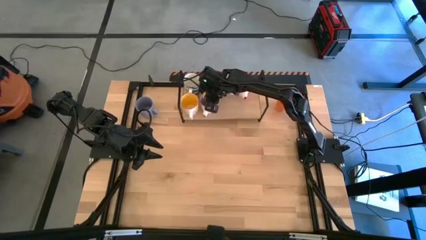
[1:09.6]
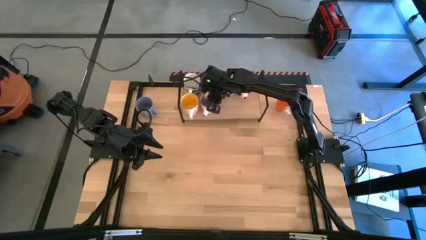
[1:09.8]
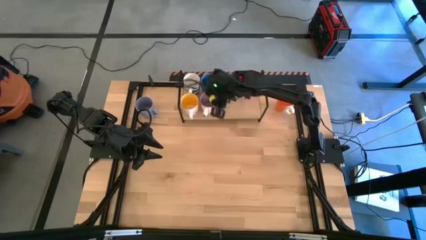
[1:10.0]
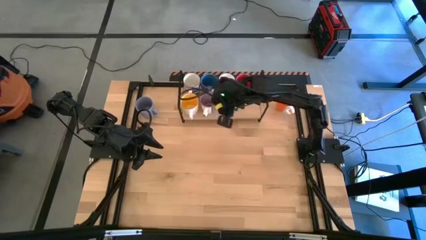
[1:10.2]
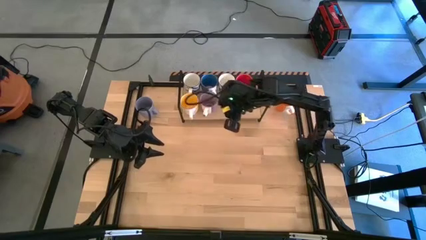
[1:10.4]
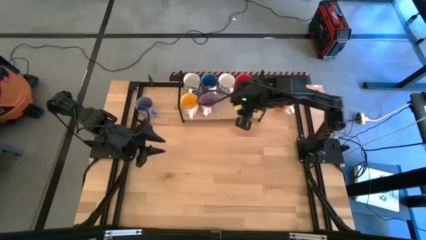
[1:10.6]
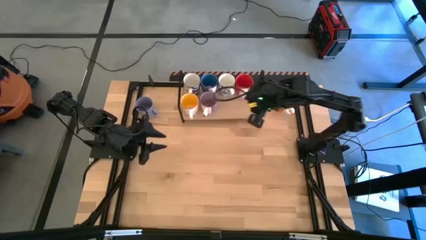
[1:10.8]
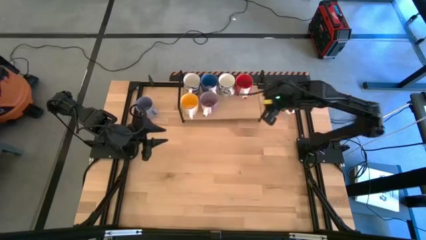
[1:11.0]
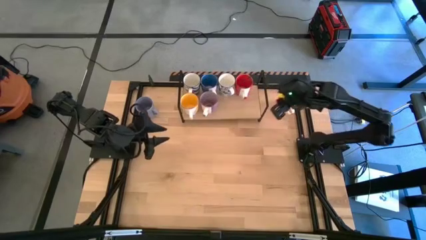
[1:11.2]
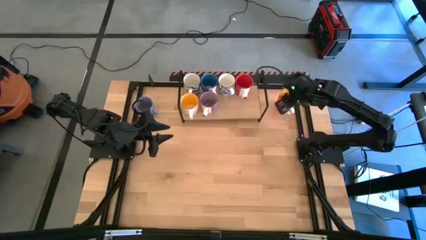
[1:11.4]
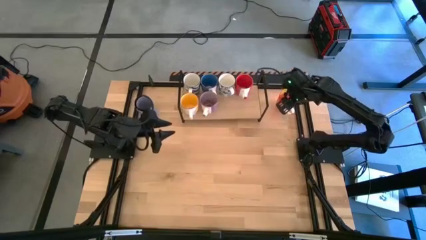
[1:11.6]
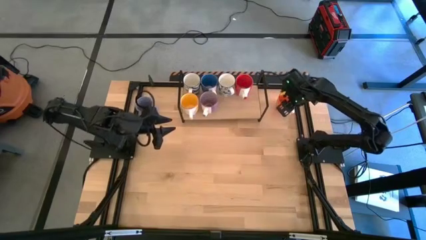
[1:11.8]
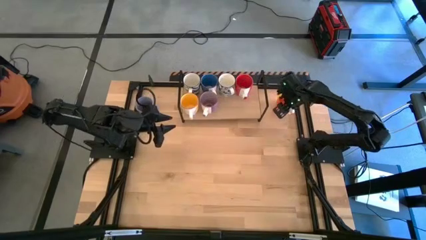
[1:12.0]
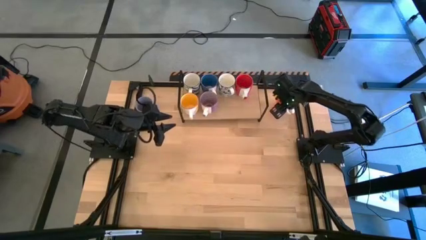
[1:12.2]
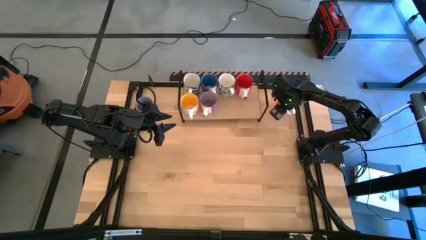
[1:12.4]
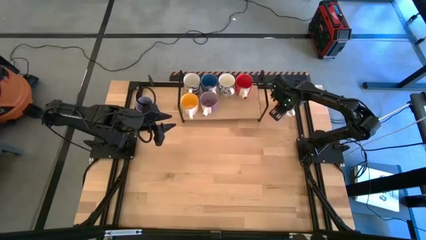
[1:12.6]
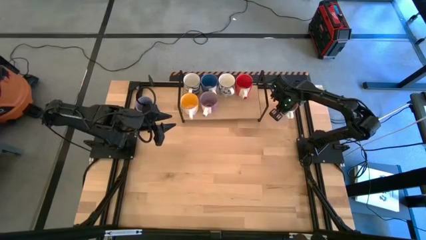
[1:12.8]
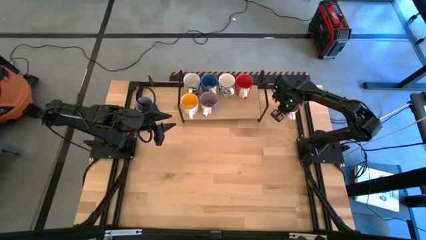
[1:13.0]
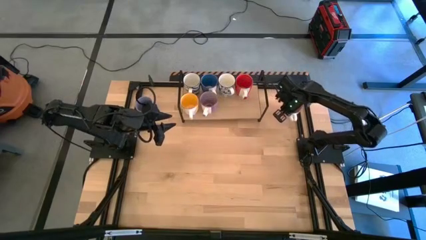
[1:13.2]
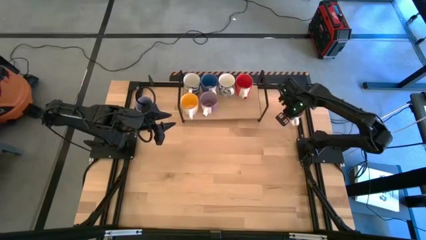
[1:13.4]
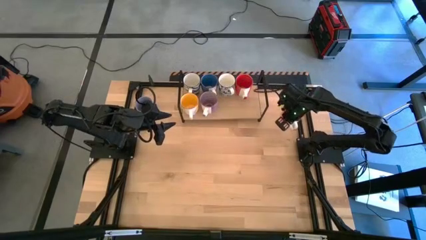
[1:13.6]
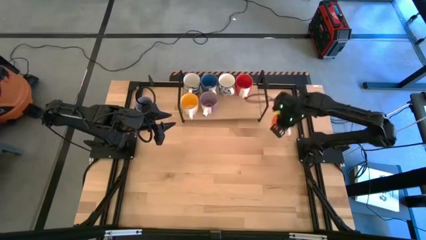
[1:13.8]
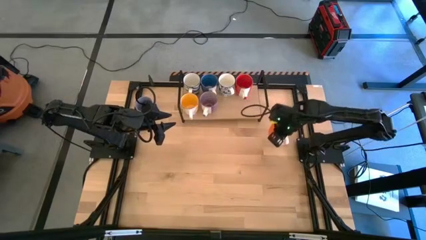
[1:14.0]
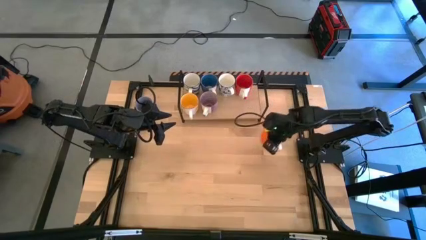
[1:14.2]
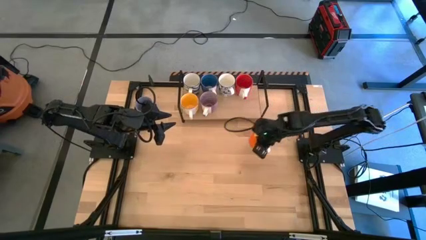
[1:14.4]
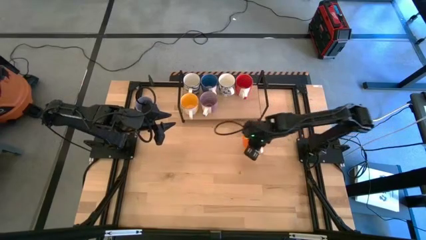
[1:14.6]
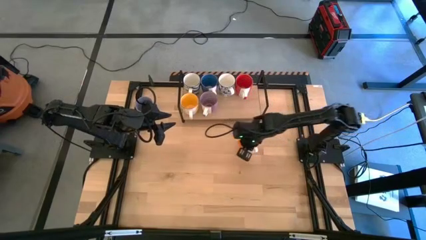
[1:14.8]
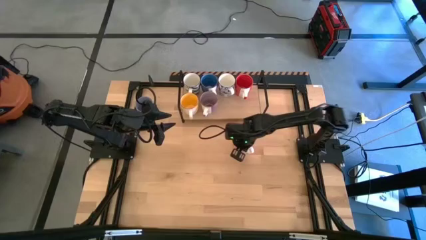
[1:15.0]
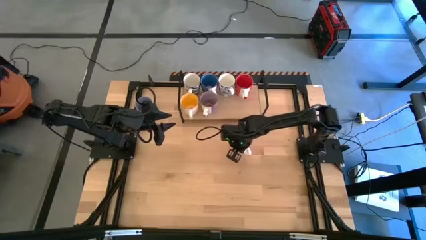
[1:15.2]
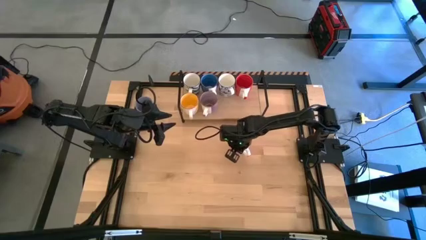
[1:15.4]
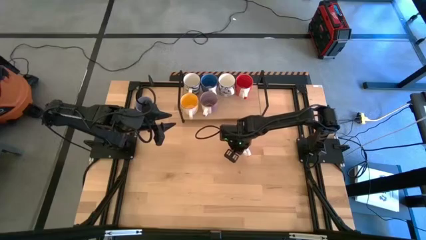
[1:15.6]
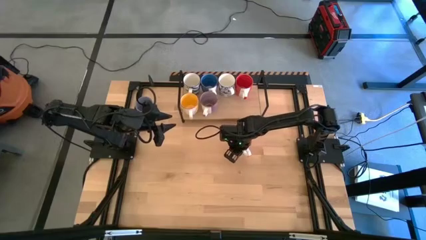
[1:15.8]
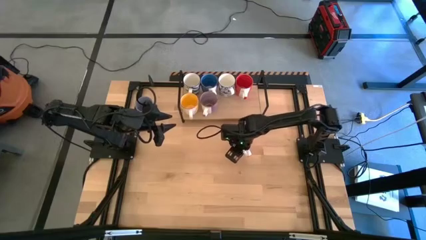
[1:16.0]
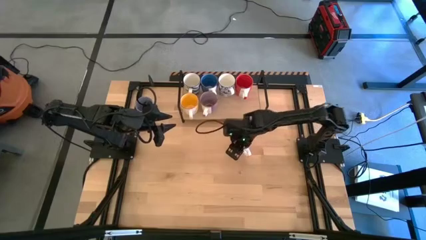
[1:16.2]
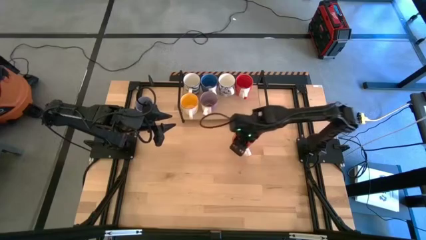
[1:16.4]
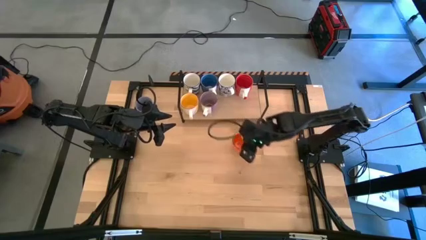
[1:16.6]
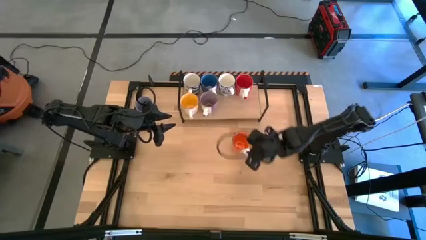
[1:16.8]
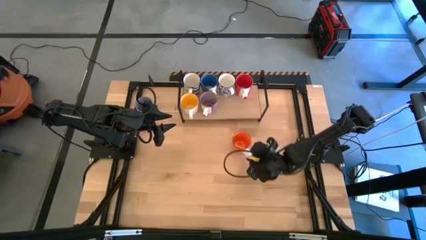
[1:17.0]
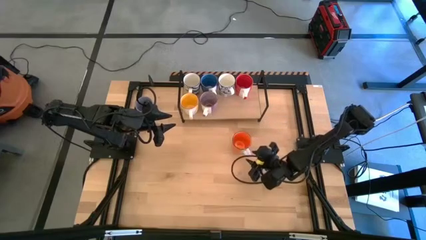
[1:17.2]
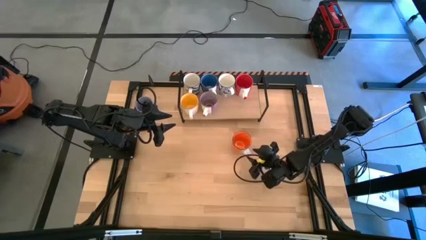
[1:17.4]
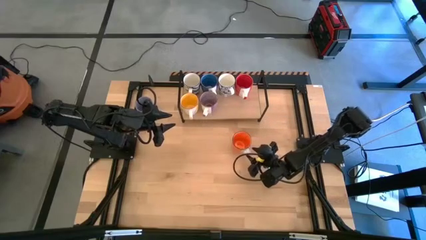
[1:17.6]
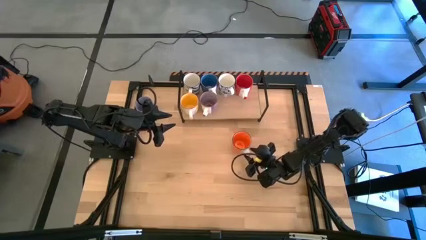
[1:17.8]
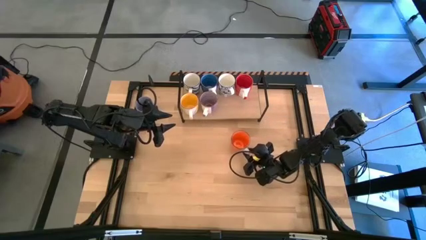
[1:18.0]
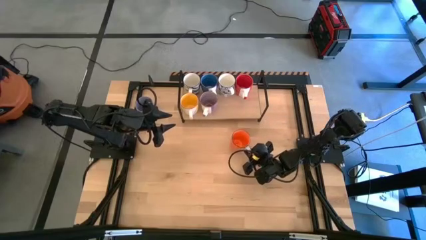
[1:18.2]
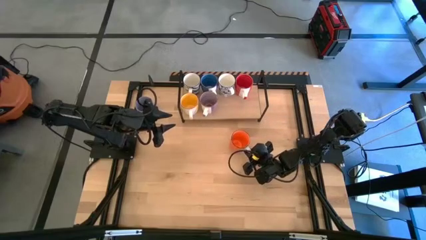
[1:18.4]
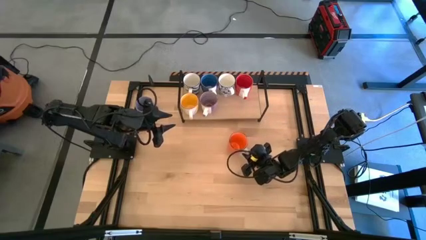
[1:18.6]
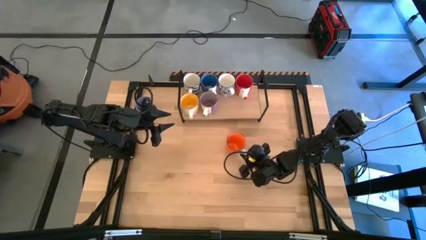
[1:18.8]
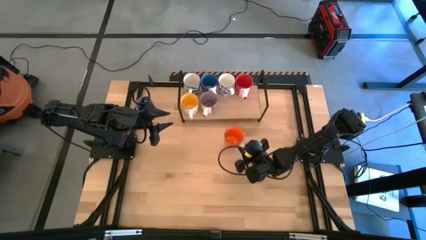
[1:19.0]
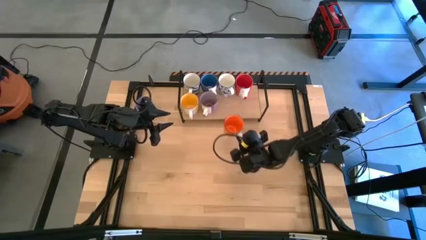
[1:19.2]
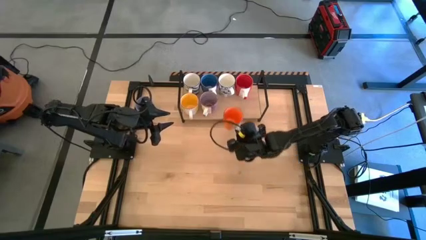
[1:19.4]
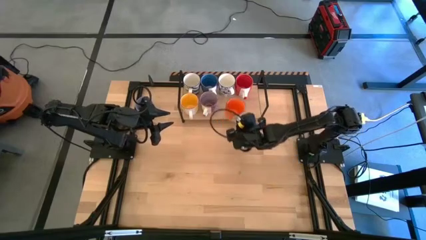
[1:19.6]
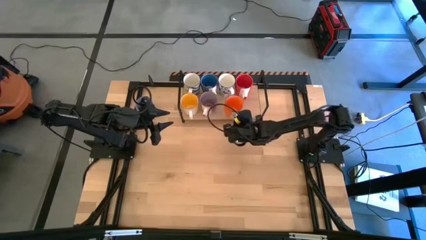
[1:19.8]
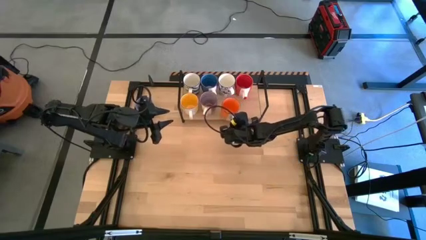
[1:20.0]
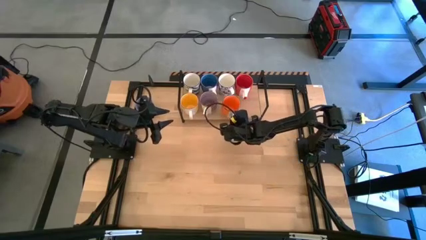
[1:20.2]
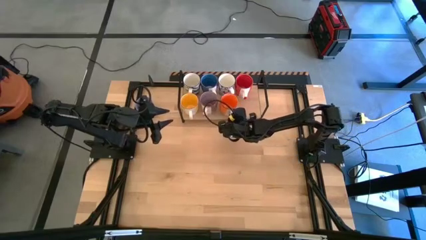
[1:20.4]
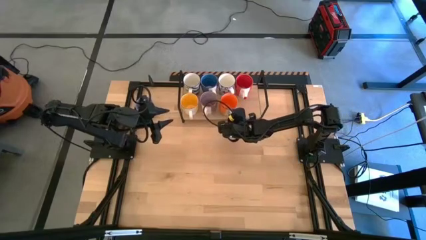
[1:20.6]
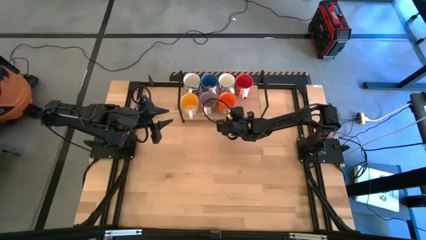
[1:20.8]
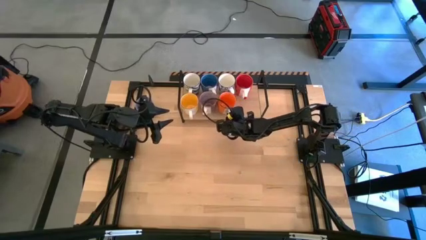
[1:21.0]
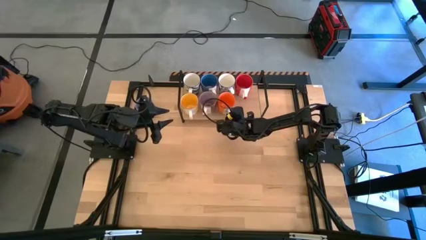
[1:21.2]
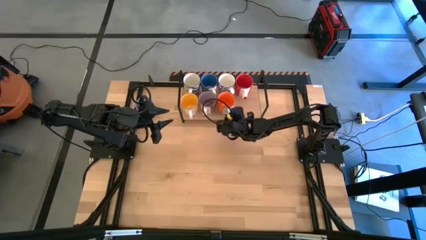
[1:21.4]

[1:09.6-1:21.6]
Task: Place coffee mugs
Put the orange mug on the shelf

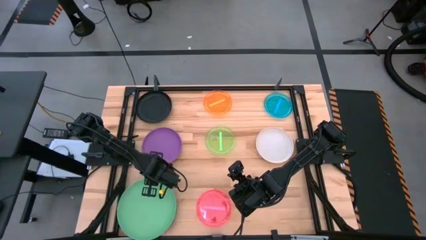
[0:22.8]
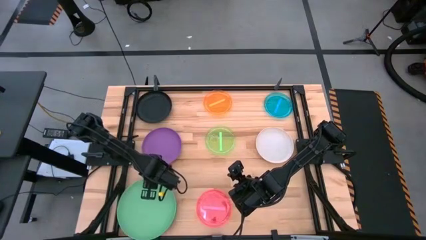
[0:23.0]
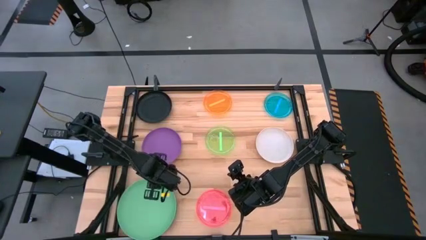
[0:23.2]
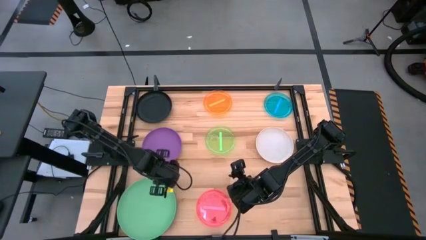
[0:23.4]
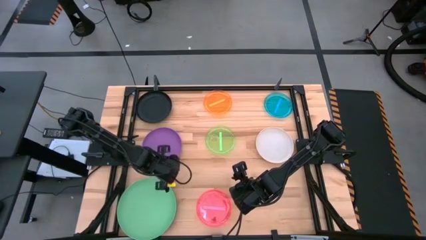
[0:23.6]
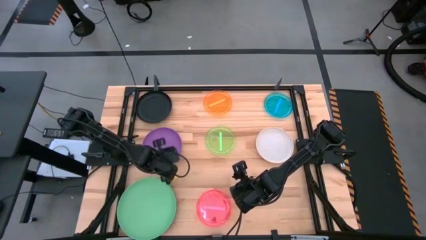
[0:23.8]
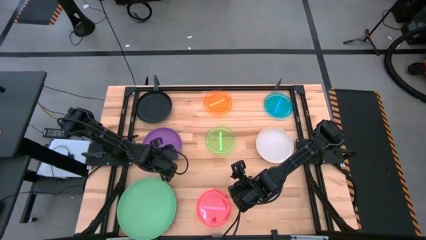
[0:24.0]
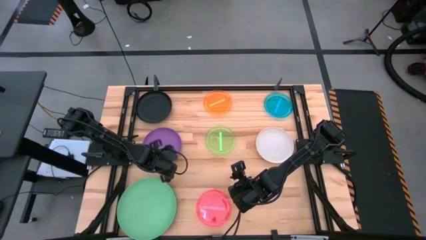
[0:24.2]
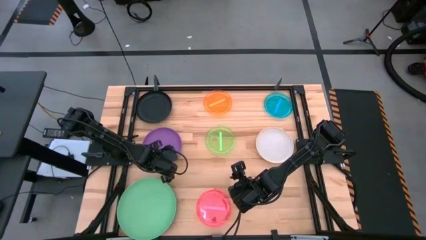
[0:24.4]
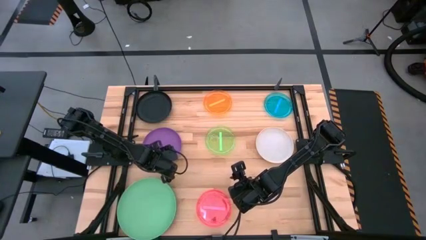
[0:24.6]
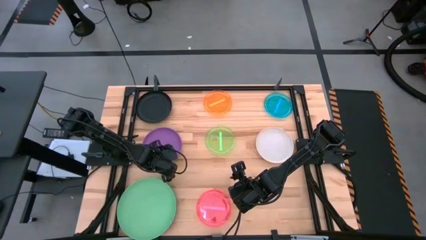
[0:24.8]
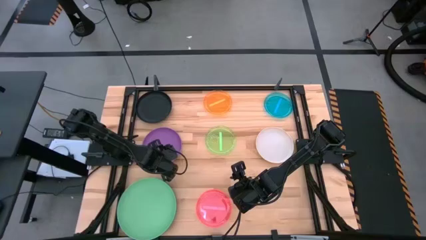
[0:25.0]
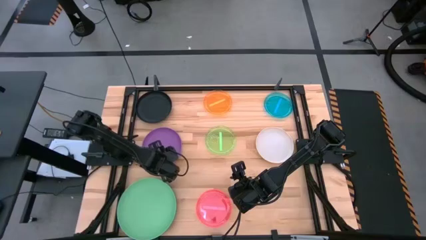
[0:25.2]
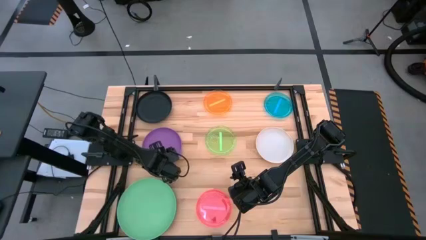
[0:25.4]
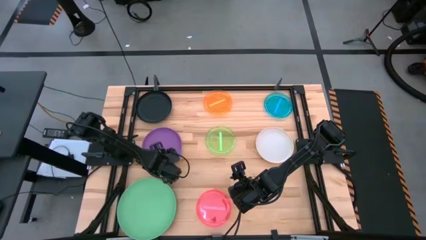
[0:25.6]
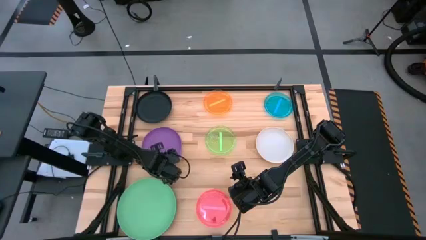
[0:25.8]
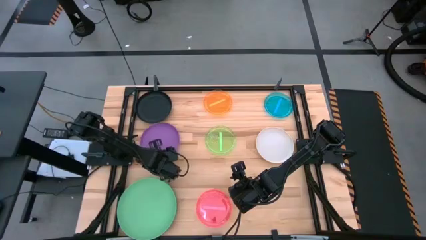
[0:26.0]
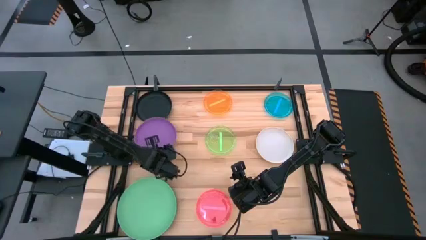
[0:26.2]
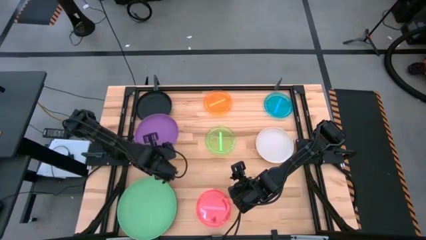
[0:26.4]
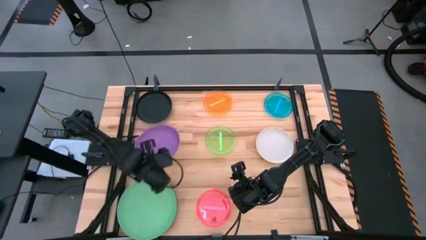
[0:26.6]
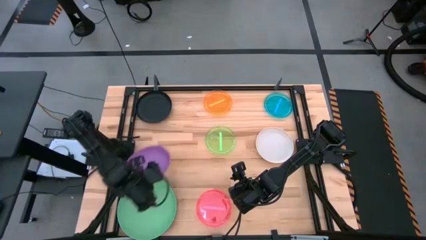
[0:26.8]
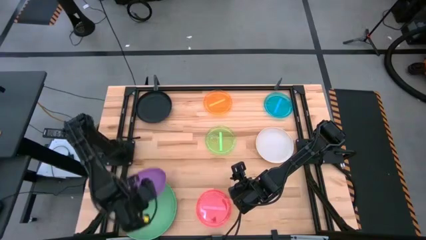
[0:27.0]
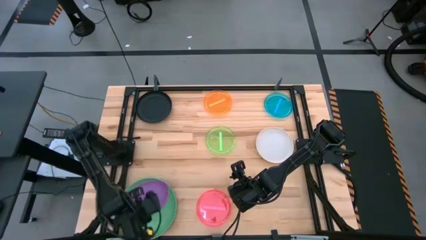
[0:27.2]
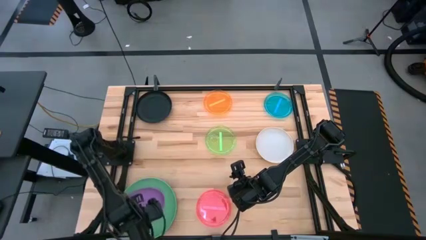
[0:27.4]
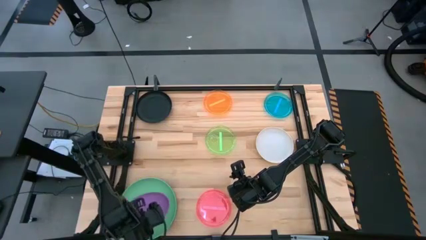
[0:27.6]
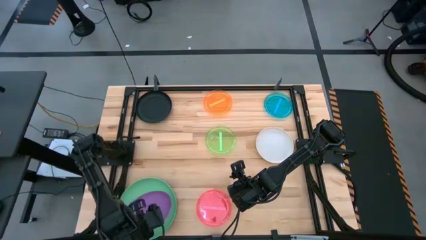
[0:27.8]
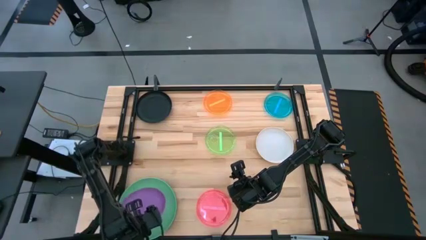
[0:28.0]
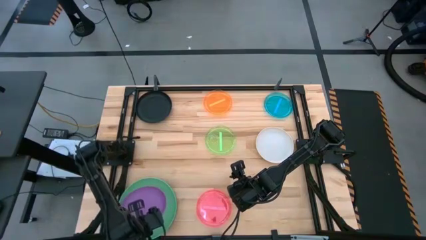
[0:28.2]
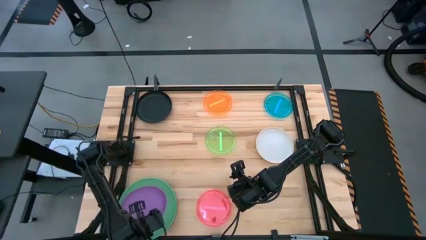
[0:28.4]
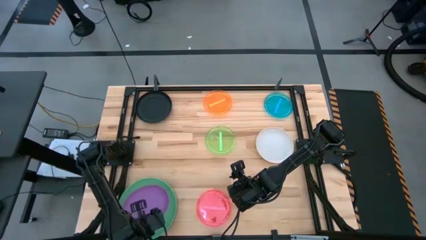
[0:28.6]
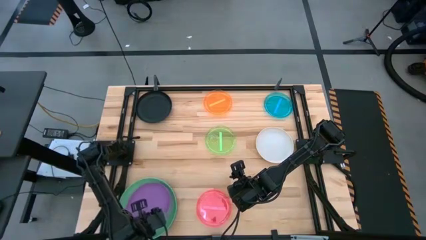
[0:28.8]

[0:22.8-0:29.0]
Task: Stack plastic plates
Stack the purple plate on top of the green plate
